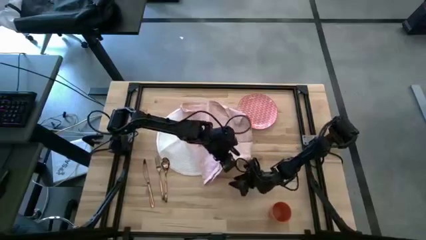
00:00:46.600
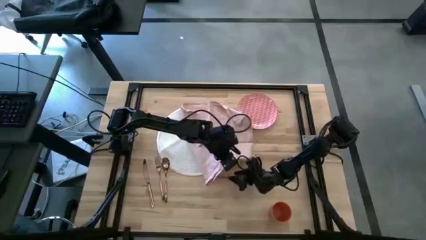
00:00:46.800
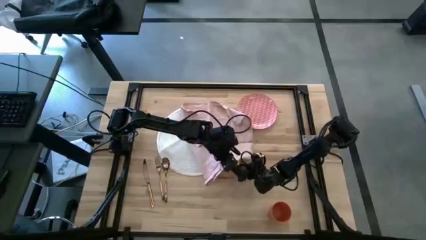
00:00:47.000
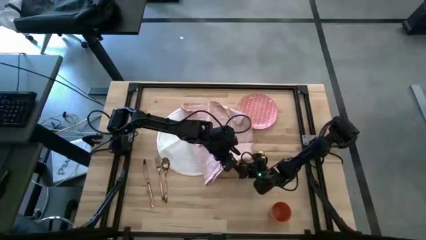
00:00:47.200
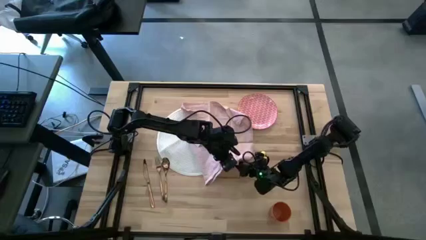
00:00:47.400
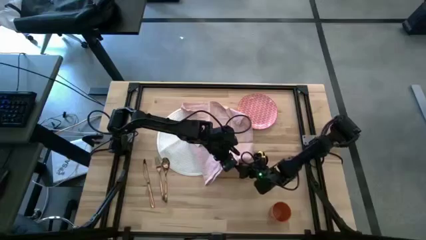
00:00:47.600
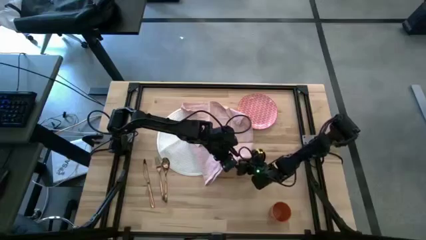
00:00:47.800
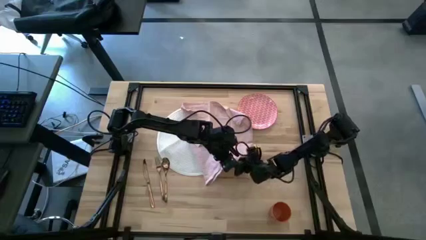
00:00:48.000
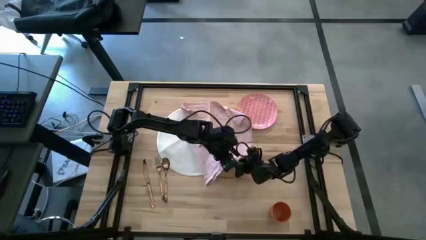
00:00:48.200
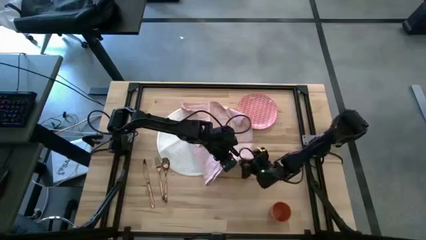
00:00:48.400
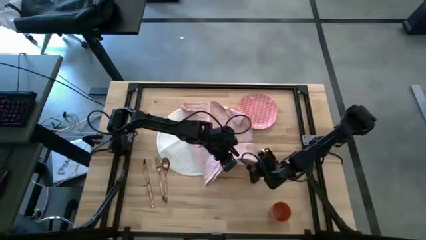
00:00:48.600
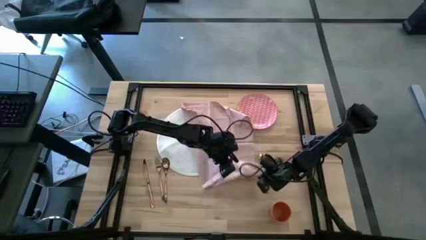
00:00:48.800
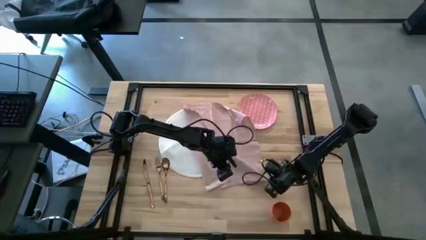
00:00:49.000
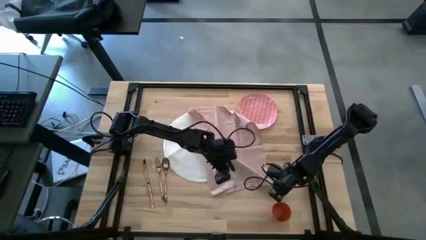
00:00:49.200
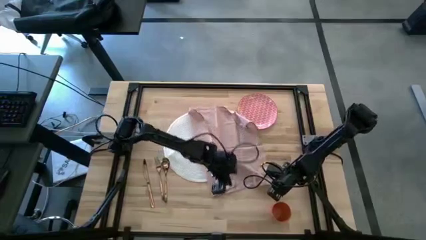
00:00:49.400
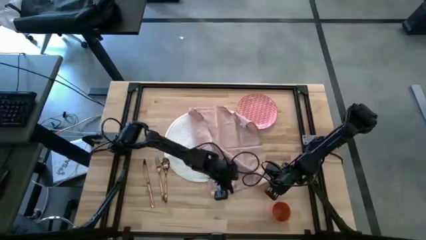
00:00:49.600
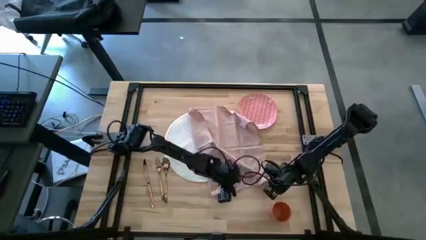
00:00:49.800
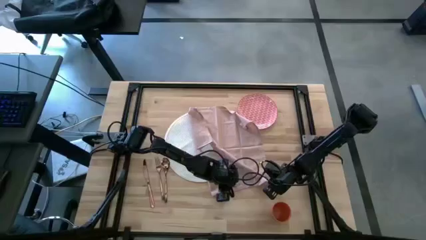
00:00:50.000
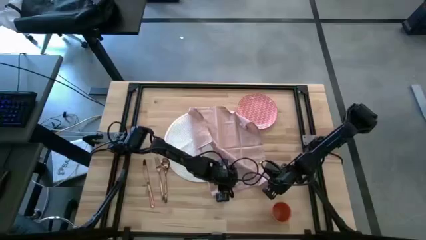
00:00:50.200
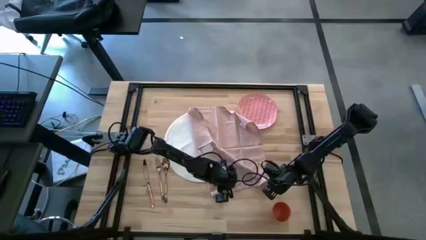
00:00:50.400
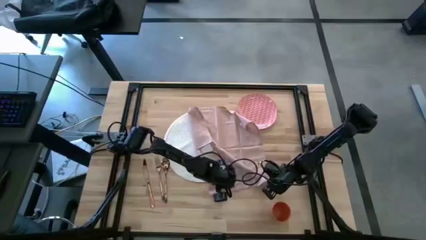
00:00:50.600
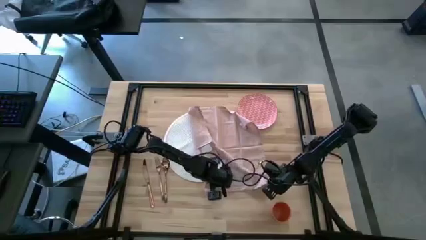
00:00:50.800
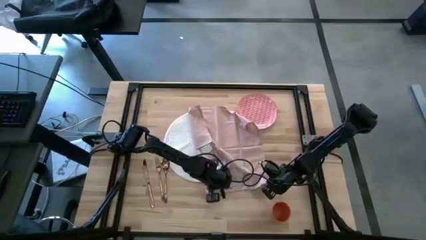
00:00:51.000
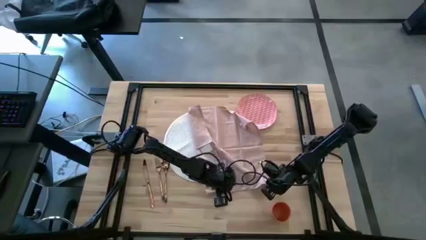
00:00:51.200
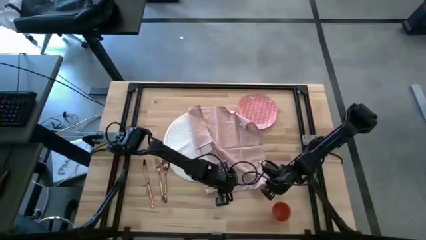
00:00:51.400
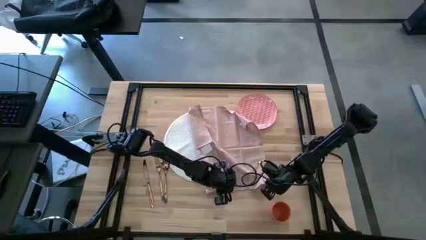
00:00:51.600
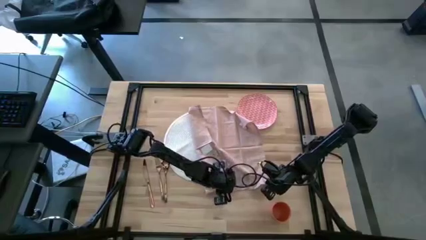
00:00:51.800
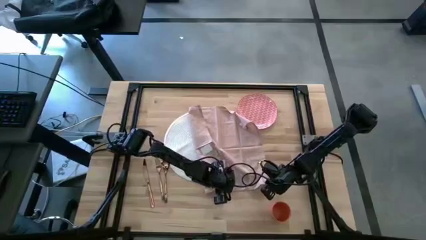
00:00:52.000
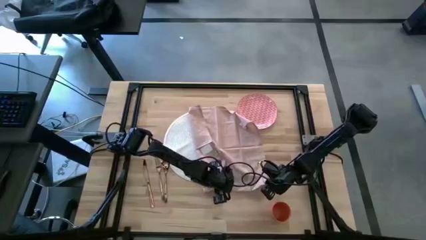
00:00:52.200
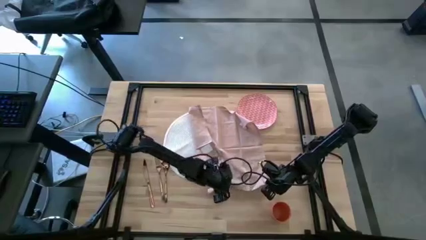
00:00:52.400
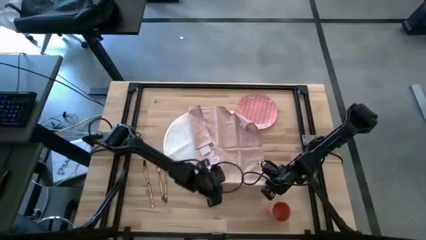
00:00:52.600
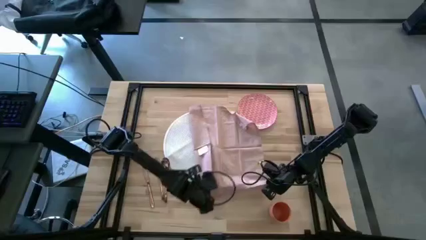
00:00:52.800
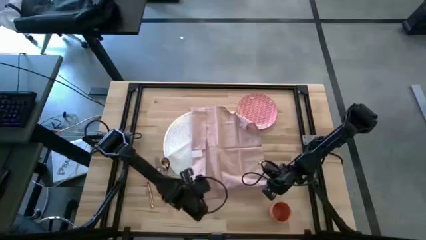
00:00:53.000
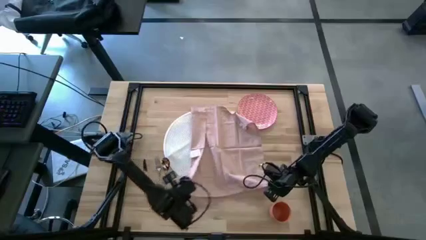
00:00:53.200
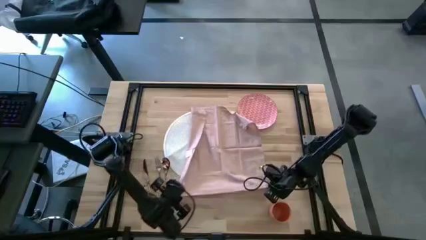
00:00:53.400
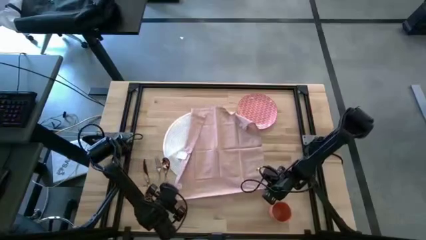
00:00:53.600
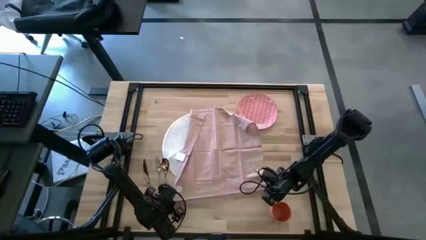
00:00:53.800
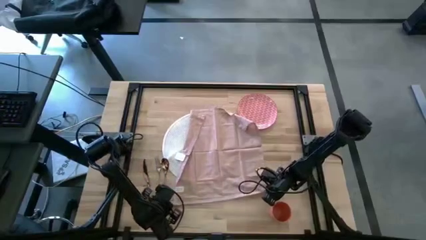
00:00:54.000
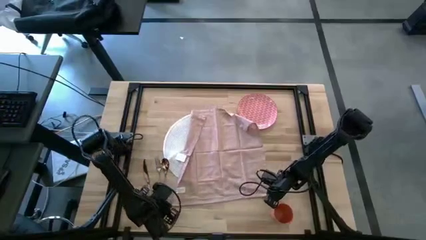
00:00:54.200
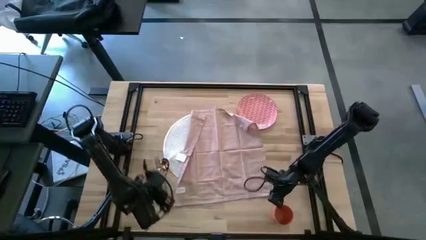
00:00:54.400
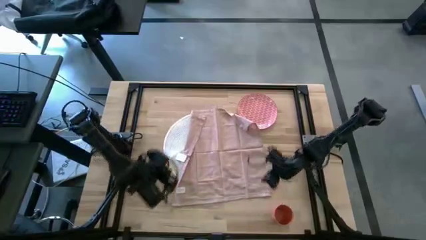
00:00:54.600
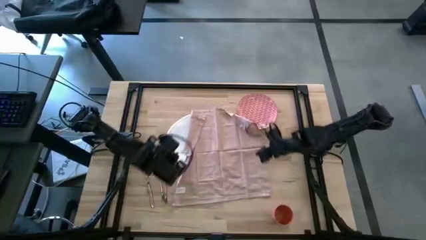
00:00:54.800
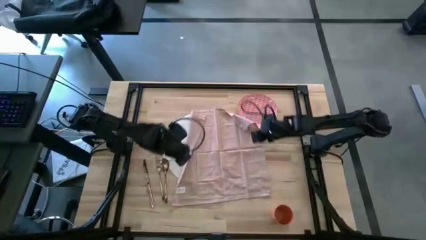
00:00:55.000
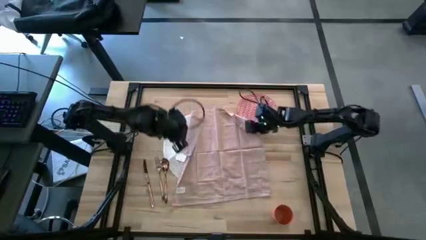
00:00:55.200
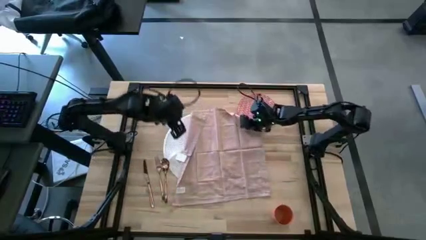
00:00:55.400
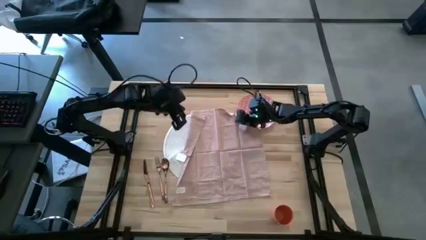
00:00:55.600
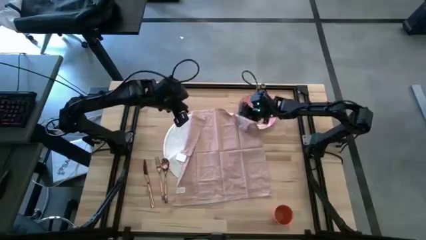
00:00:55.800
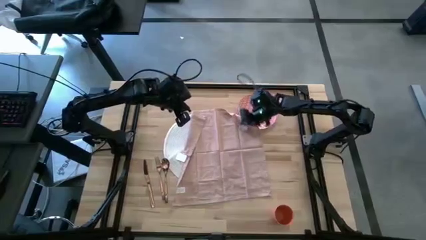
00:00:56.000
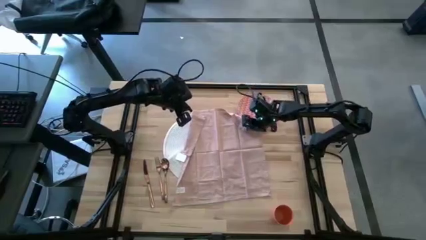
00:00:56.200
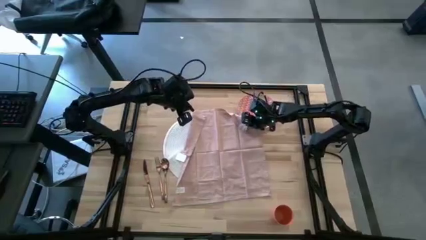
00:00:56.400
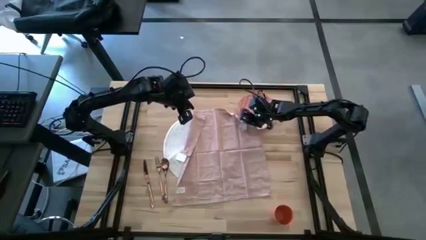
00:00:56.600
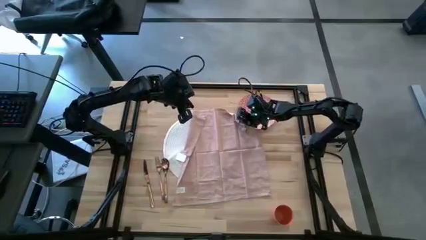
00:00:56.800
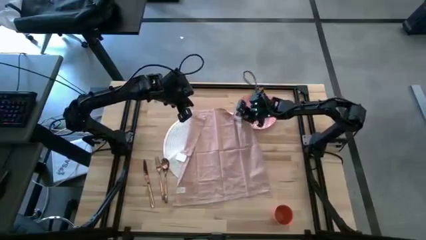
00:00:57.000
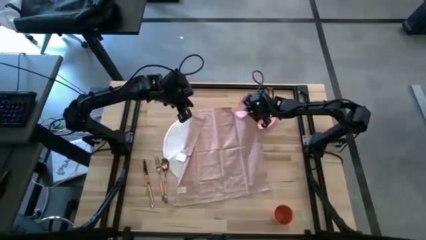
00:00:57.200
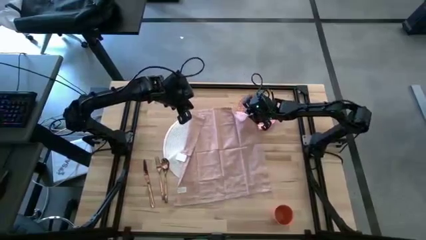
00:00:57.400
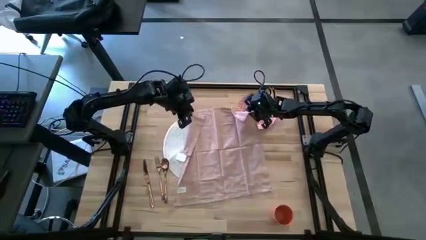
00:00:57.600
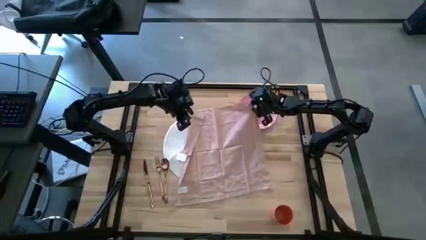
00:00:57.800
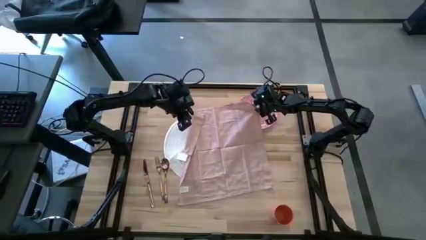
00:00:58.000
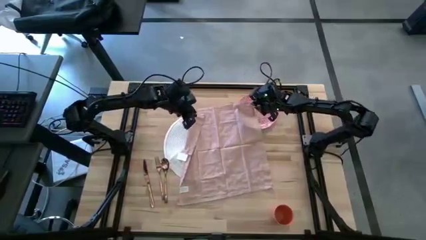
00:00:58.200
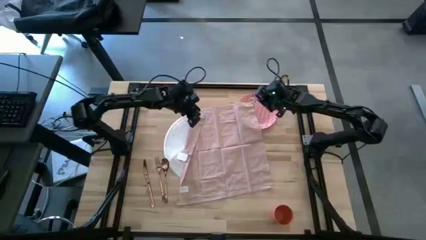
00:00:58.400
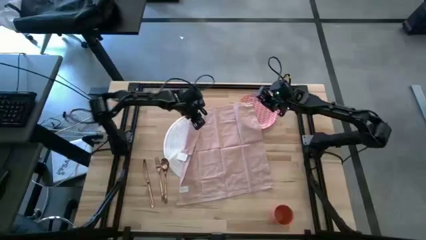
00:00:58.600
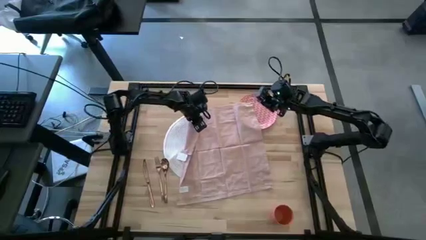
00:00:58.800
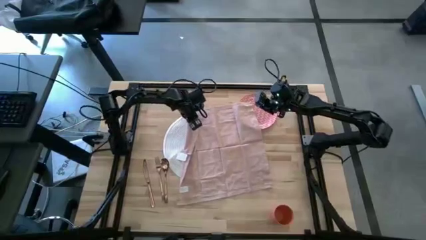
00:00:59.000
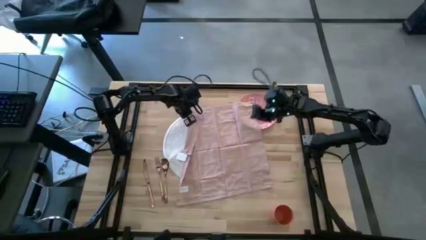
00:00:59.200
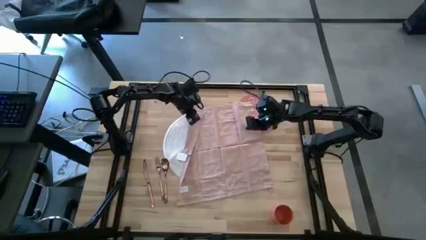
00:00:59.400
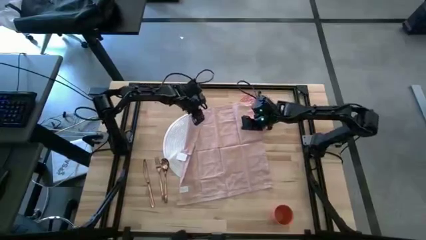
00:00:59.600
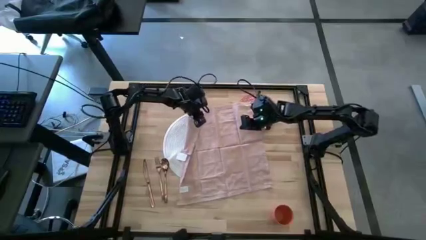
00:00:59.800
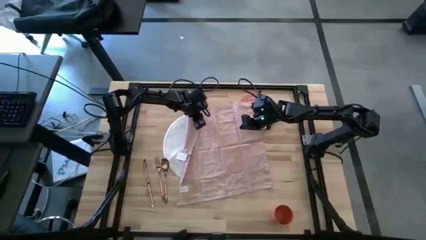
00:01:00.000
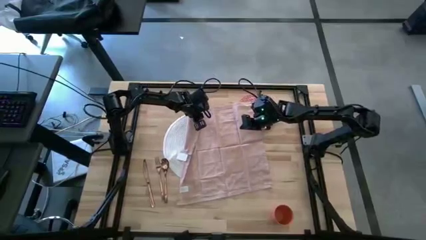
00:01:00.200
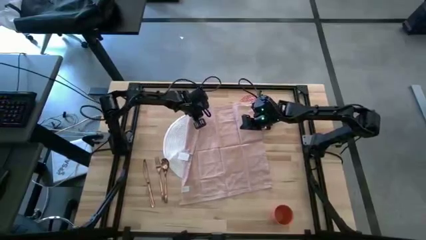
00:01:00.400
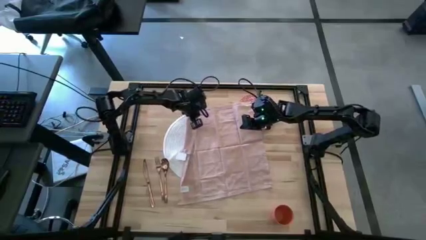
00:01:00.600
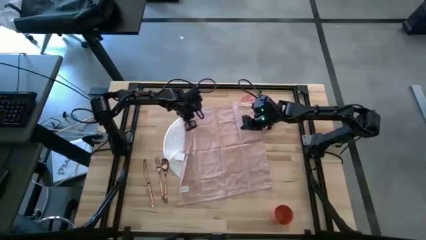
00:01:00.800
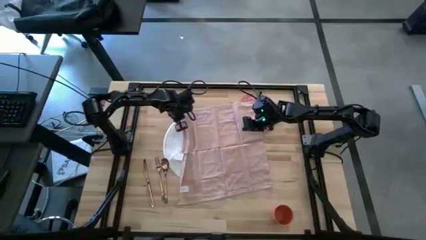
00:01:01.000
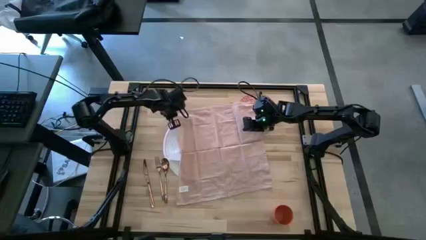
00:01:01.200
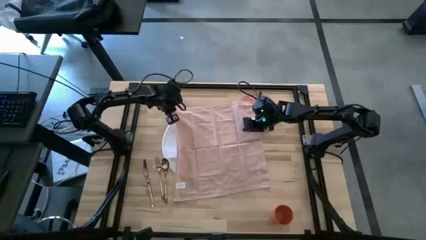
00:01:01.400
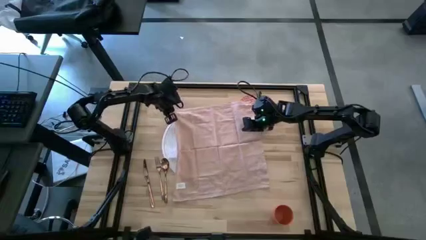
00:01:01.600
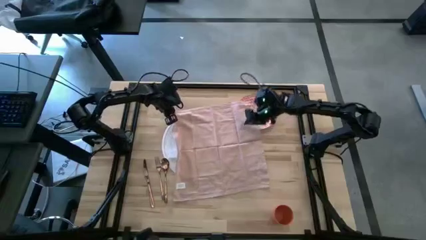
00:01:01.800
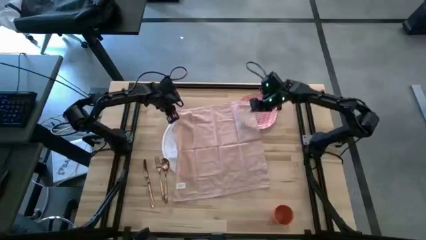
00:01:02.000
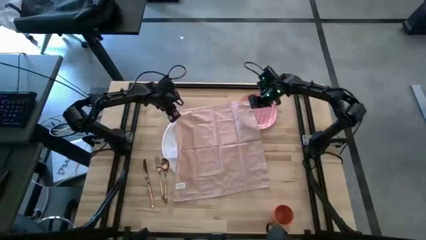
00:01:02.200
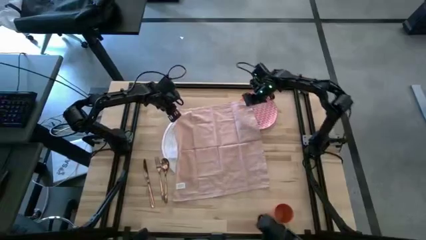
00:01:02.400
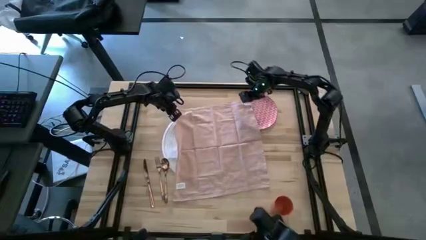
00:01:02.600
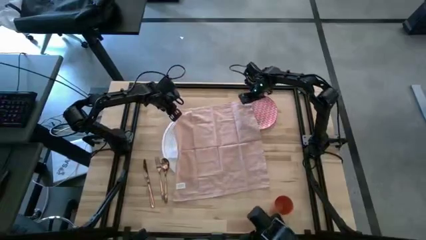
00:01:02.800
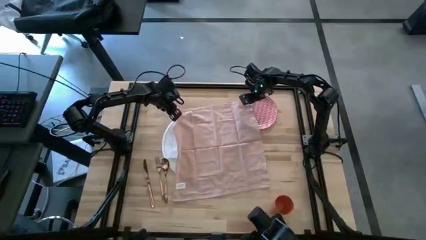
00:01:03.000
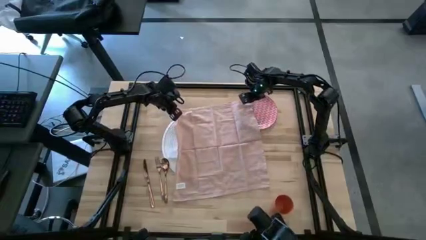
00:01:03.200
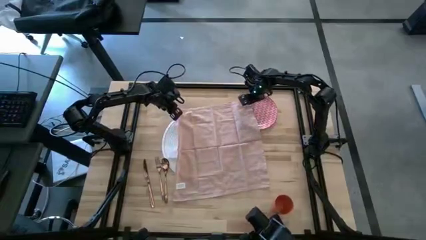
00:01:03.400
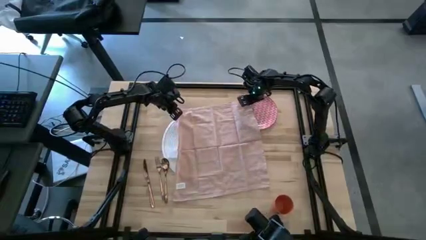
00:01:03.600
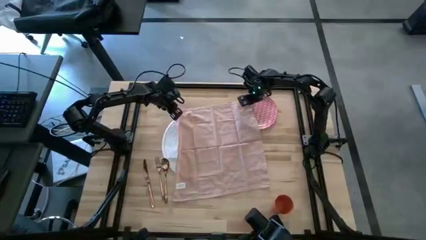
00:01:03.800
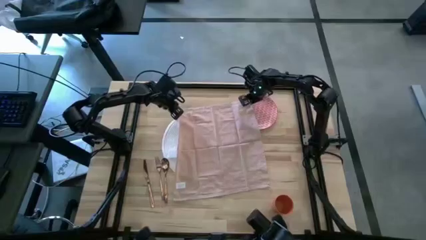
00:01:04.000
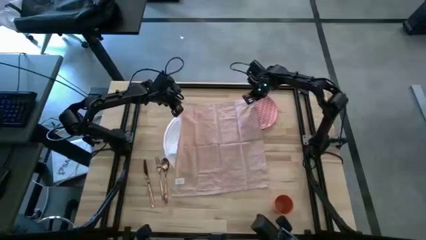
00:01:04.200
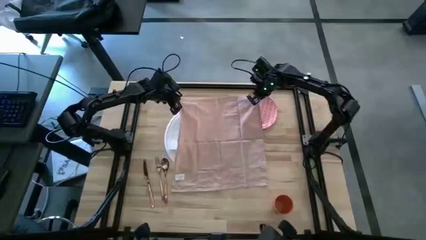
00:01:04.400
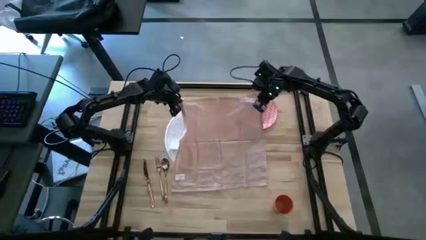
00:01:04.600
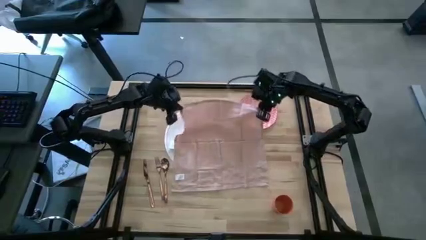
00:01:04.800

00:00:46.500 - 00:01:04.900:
Task: Set table place
Fold the pink napkin
